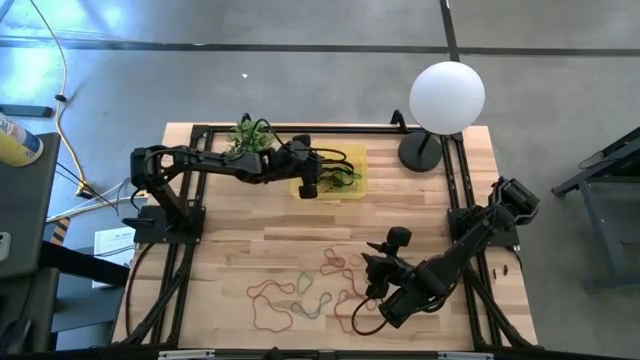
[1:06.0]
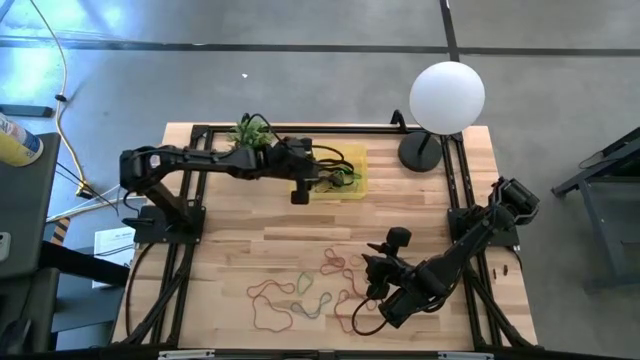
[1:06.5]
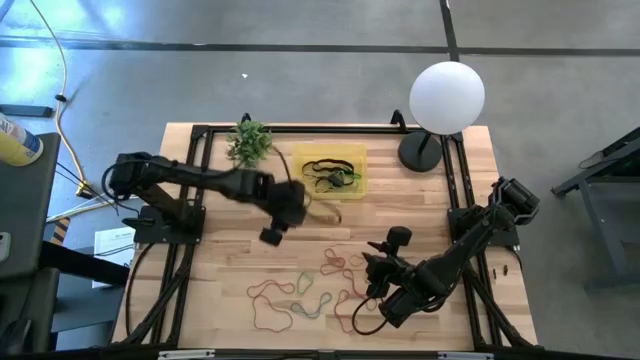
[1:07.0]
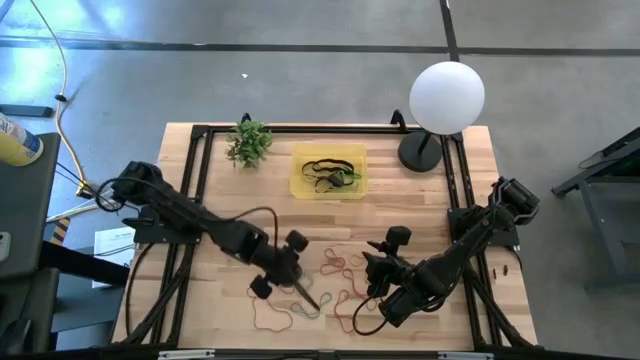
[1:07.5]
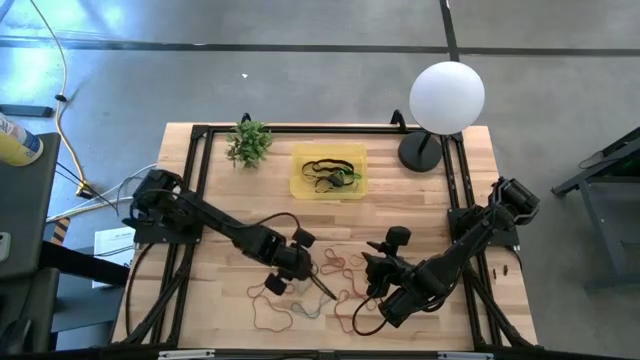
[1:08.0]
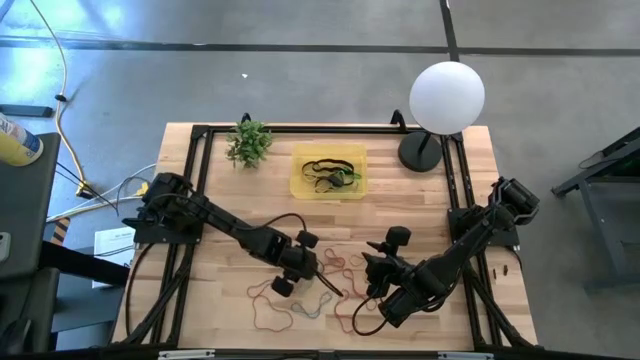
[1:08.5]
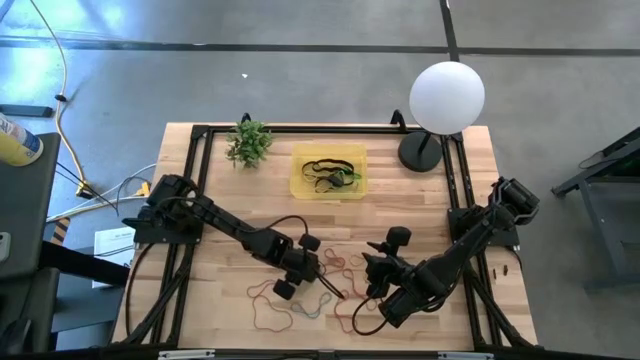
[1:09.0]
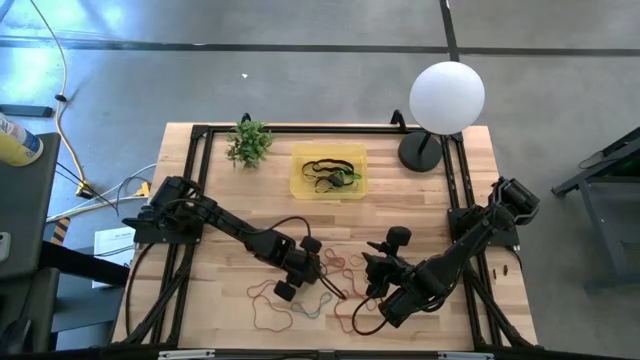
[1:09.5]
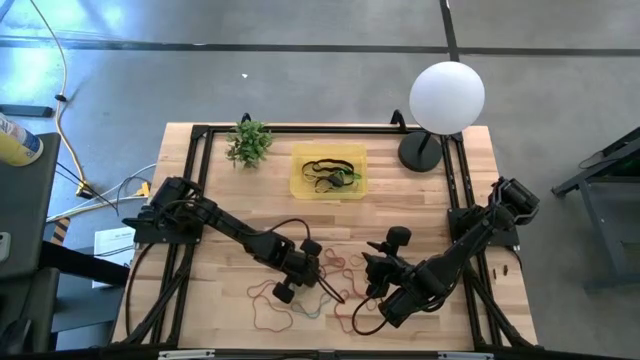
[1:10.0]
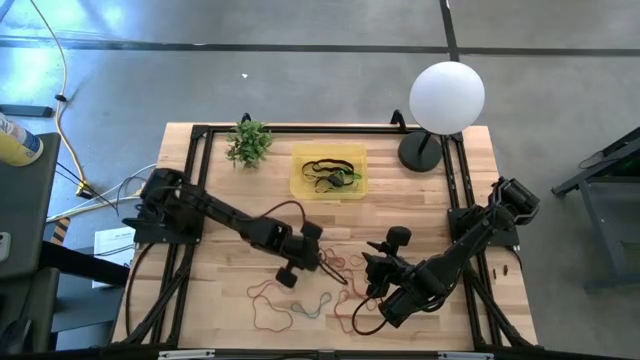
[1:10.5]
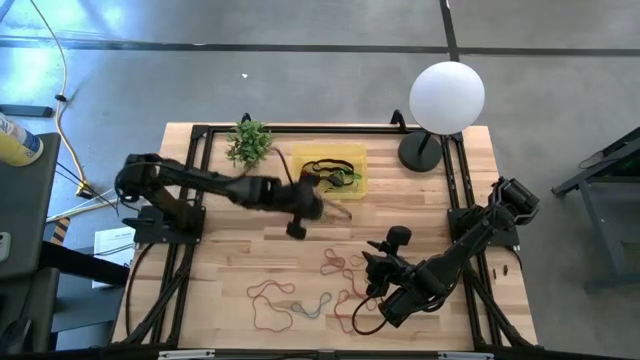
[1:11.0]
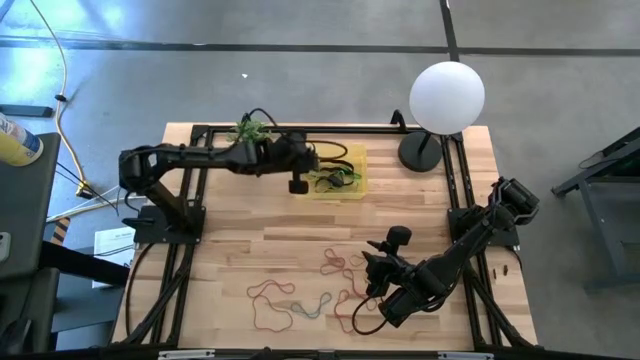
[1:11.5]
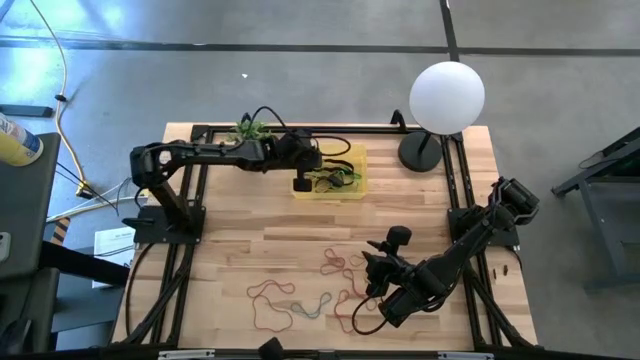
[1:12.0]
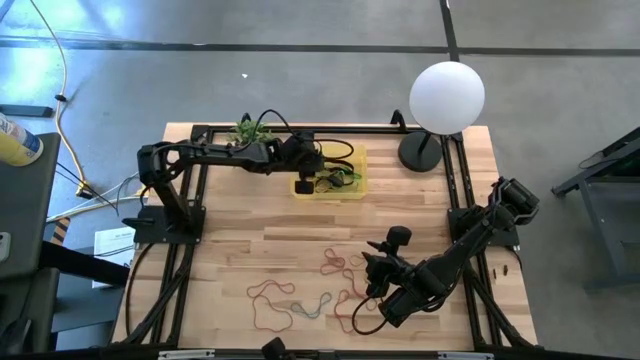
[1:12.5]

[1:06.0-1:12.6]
Task: Pick and place rubber bands into bin
Put the green rubber band into the yellow bin

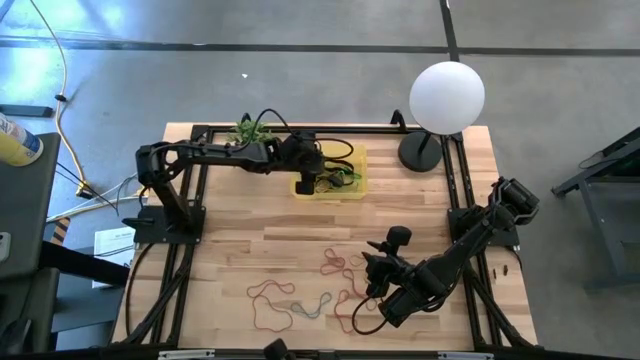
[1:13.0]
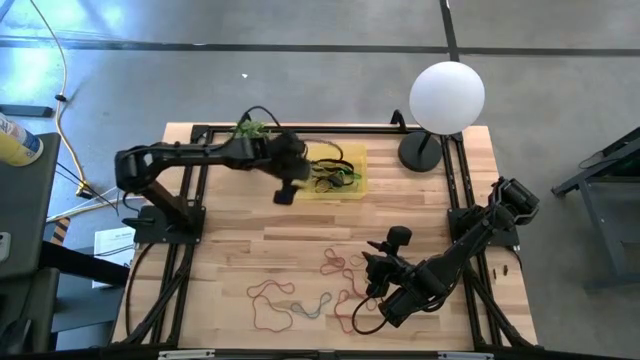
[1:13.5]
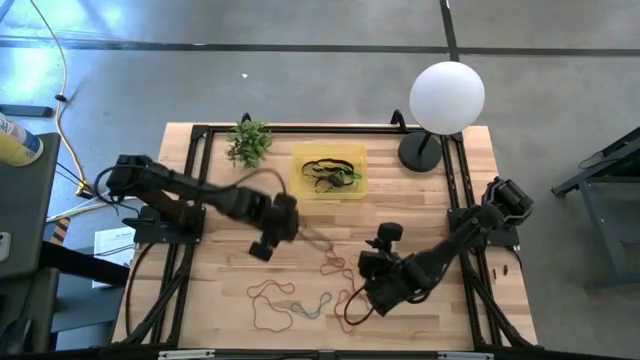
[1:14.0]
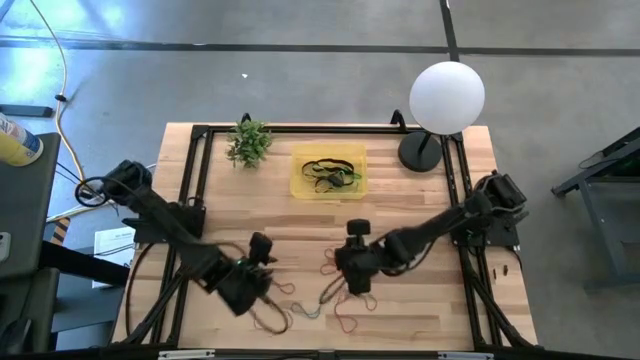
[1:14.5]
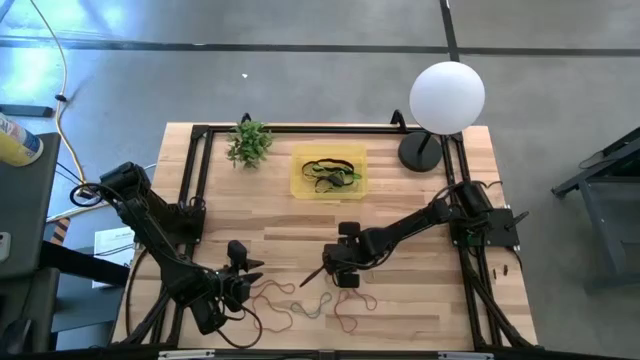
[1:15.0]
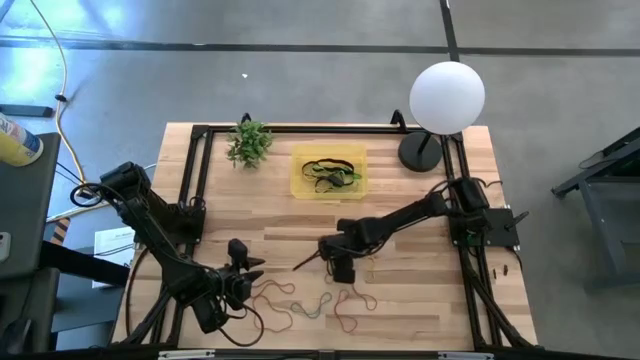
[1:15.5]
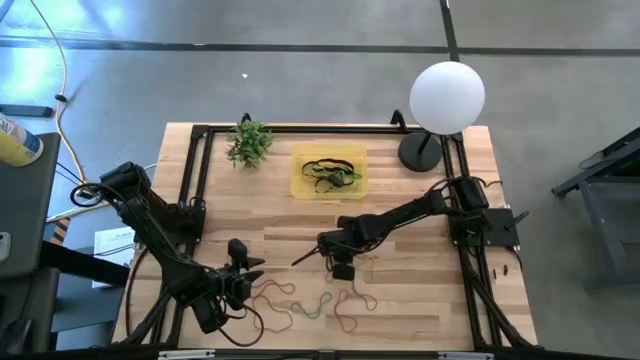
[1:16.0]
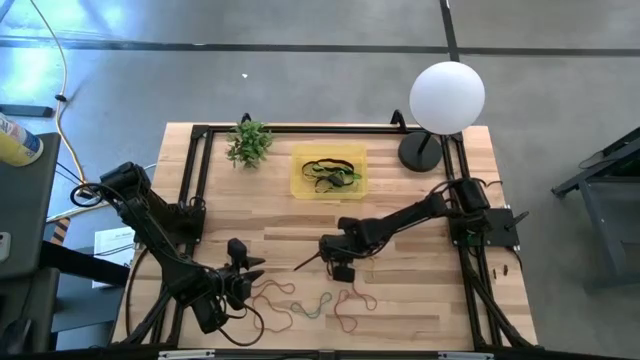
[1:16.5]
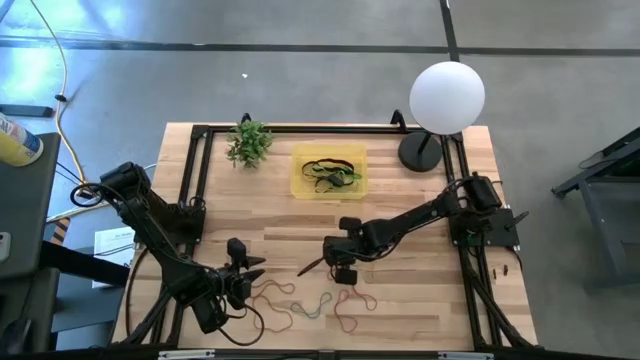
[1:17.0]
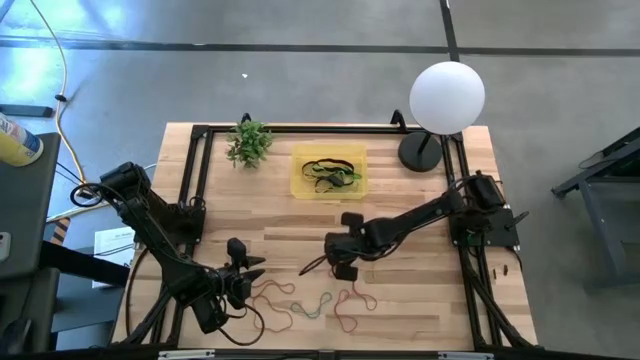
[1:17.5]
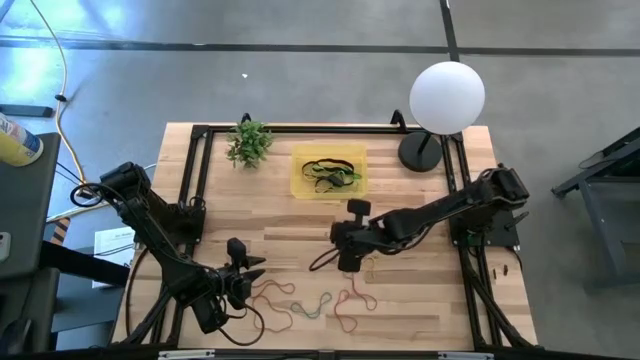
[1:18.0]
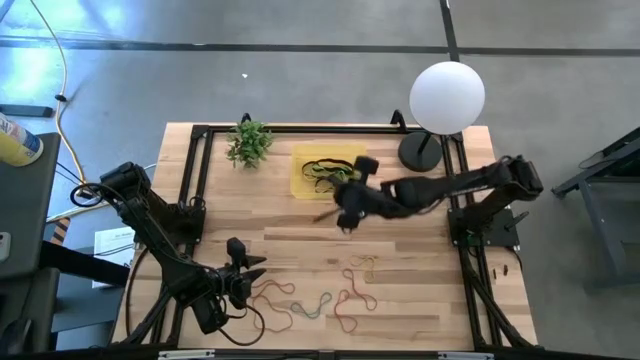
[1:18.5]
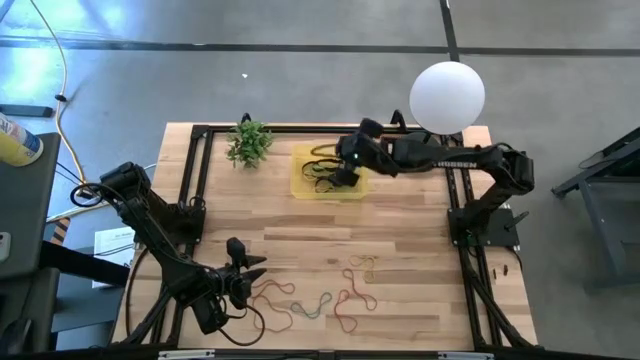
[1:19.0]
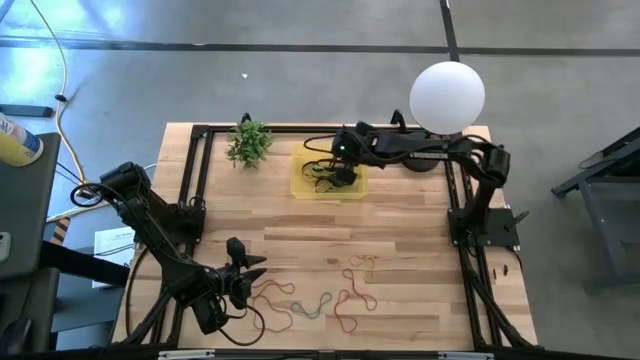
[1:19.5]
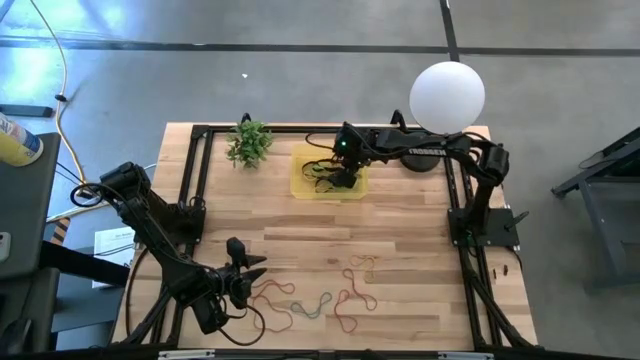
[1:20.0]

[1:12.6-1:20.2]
Put the red rubber band into the yellow bin

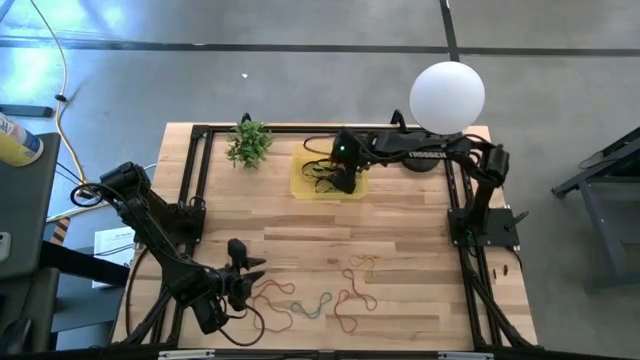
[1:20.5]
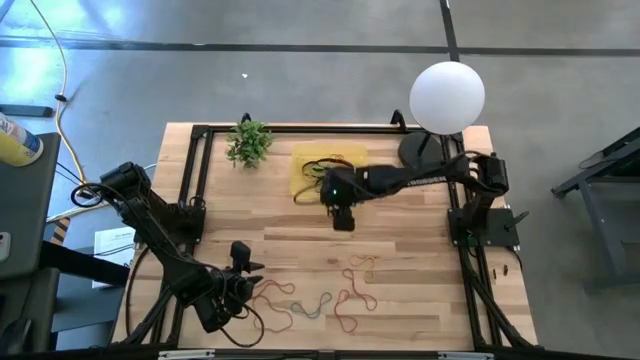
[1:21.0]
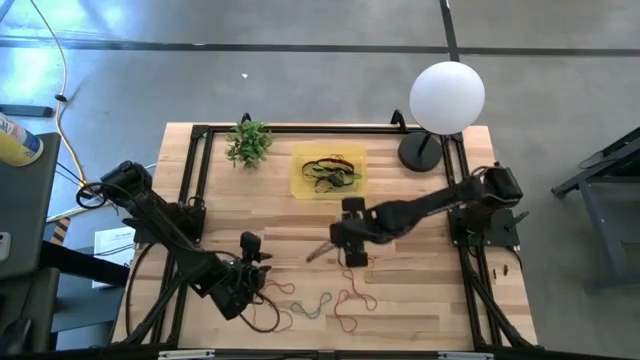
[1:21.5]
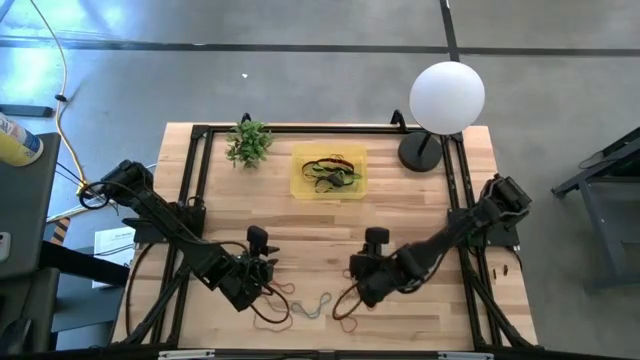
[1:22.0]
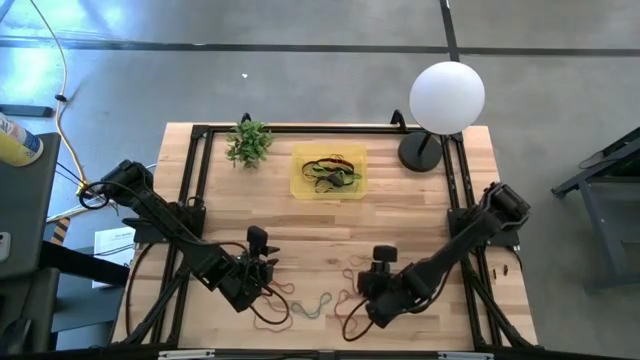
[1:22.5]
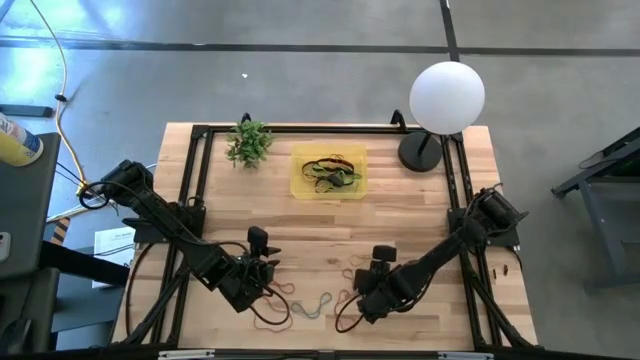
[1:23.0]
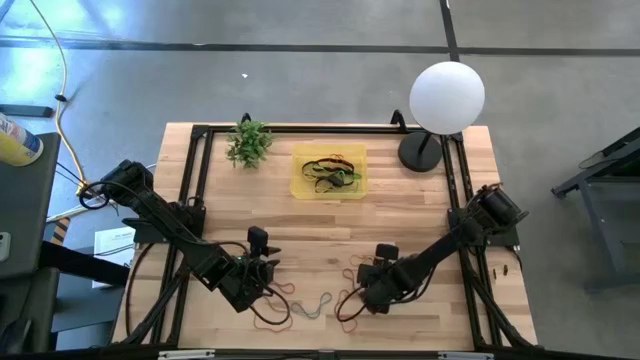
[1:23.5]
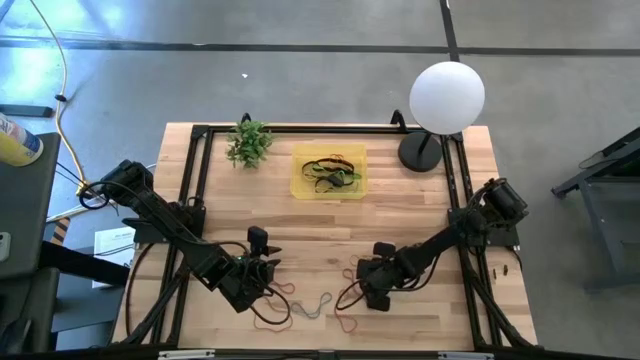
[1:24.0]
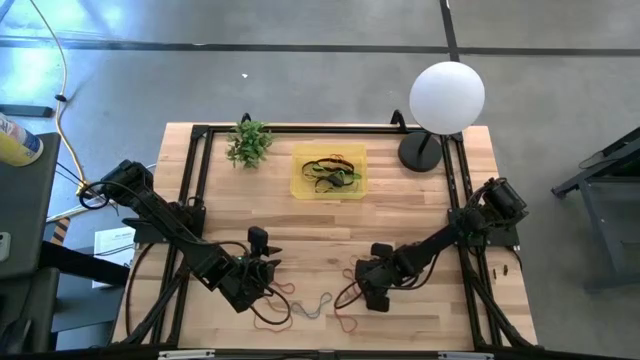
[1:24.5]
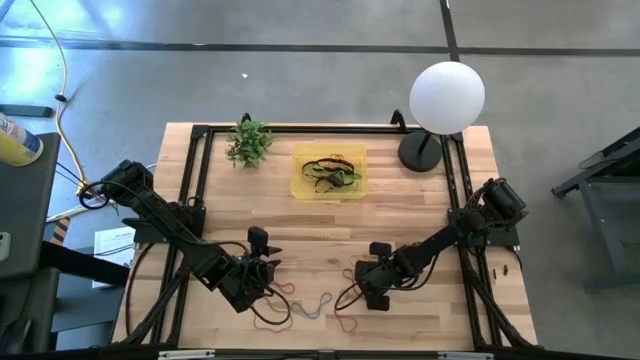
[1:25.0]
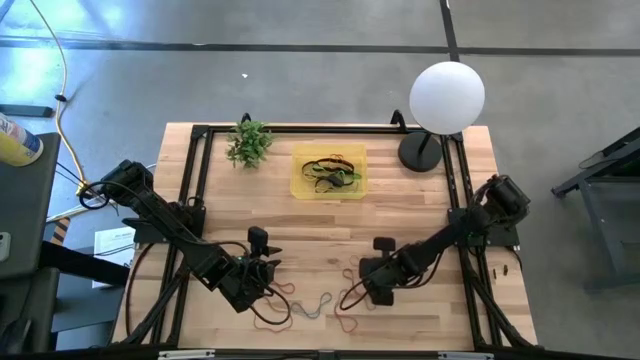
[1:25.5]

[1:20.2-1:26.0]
Put the yellow rubber band into the yellow bin
